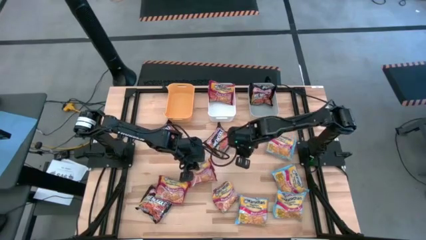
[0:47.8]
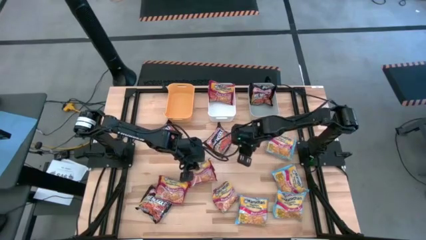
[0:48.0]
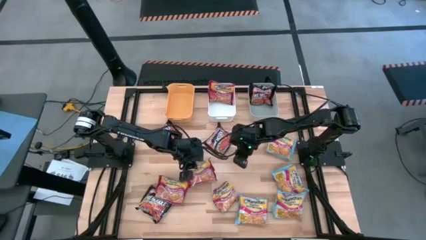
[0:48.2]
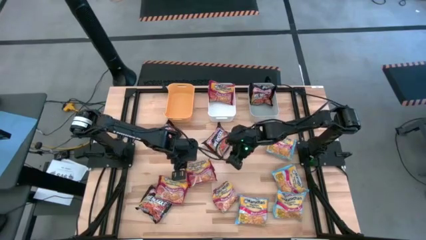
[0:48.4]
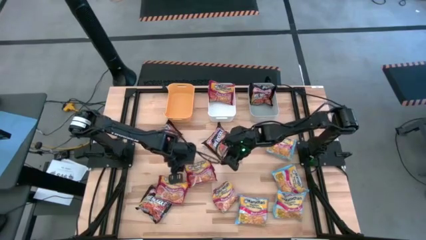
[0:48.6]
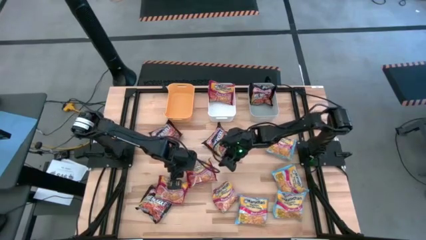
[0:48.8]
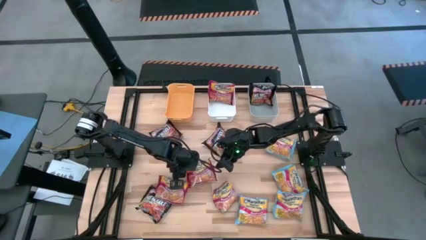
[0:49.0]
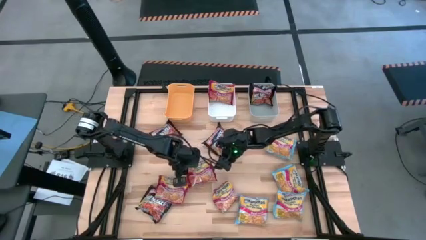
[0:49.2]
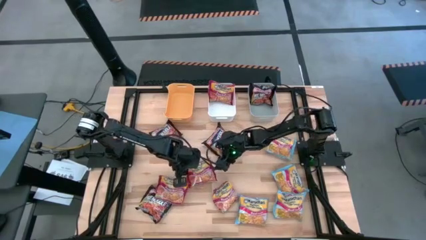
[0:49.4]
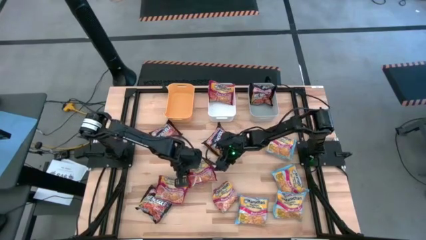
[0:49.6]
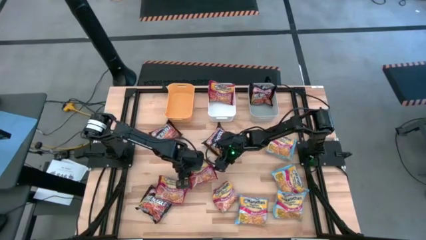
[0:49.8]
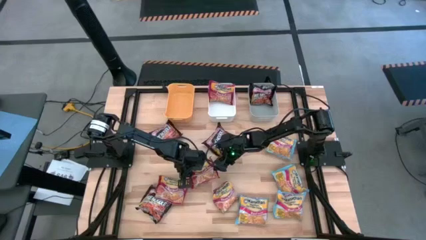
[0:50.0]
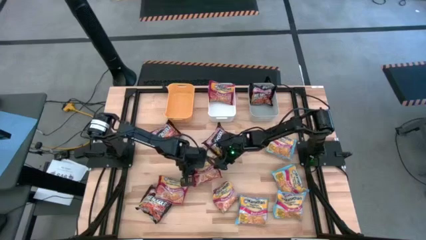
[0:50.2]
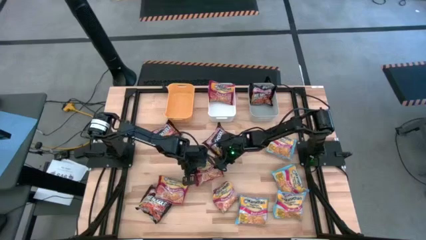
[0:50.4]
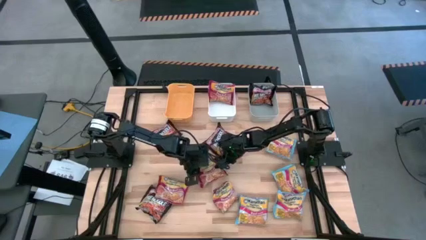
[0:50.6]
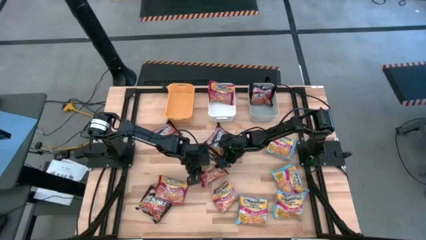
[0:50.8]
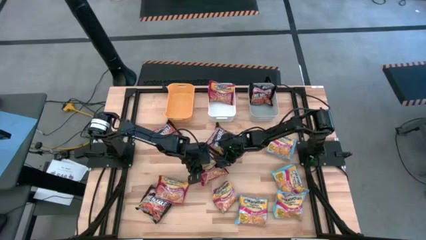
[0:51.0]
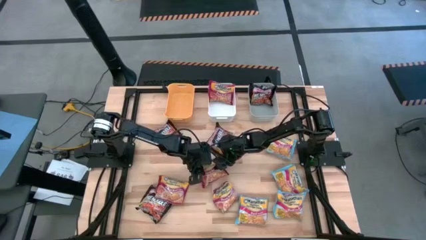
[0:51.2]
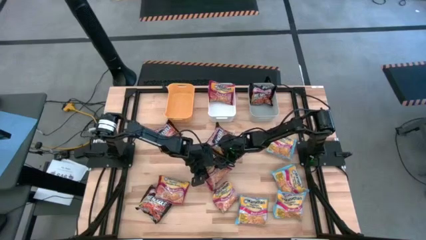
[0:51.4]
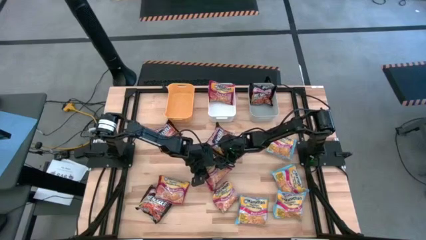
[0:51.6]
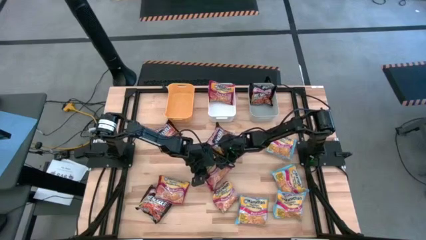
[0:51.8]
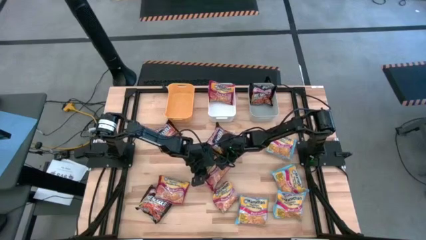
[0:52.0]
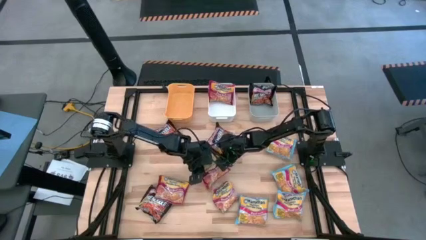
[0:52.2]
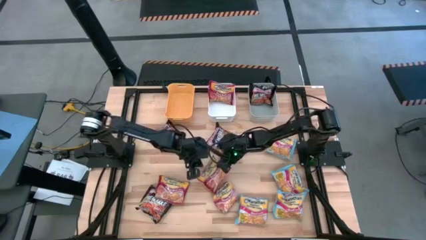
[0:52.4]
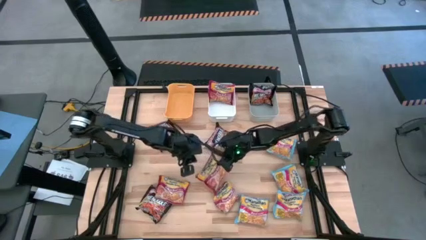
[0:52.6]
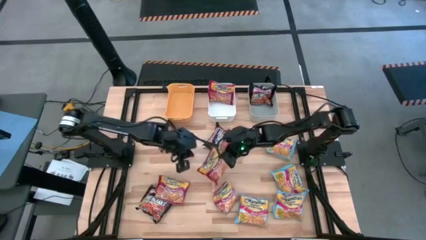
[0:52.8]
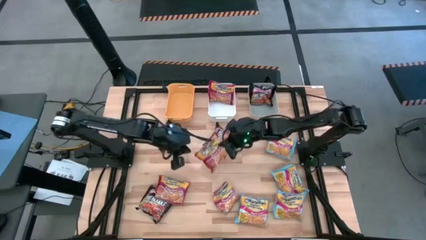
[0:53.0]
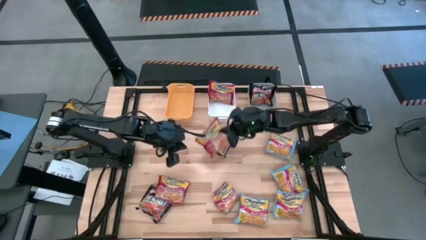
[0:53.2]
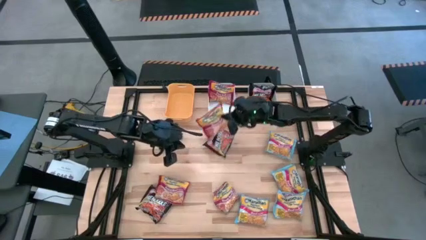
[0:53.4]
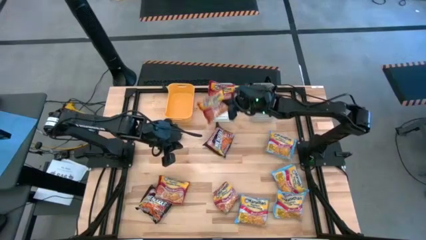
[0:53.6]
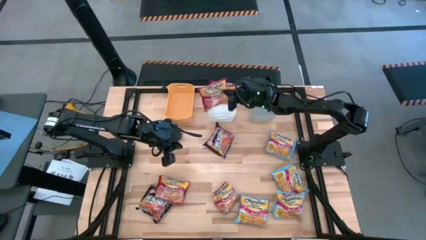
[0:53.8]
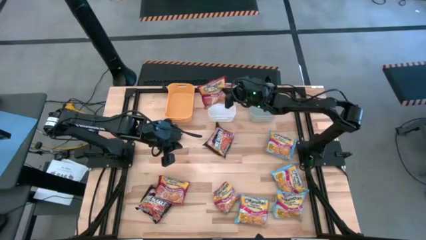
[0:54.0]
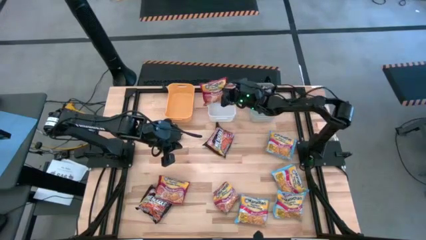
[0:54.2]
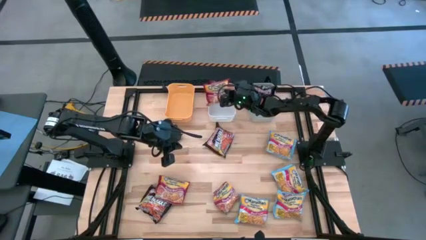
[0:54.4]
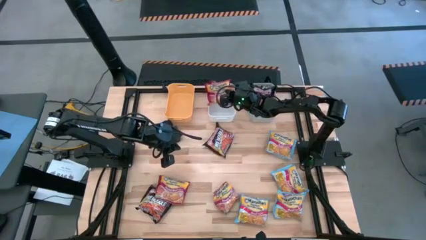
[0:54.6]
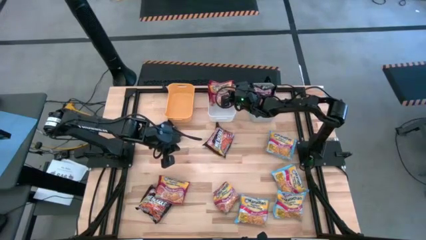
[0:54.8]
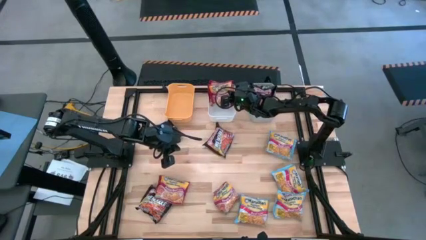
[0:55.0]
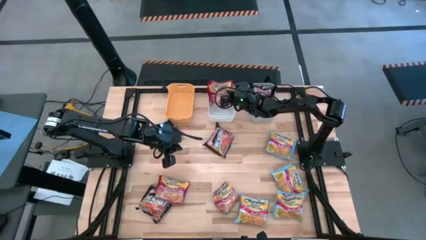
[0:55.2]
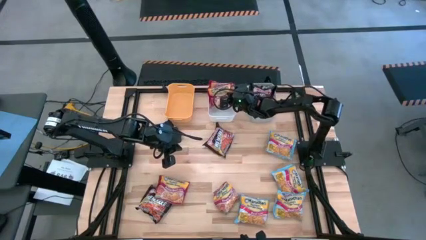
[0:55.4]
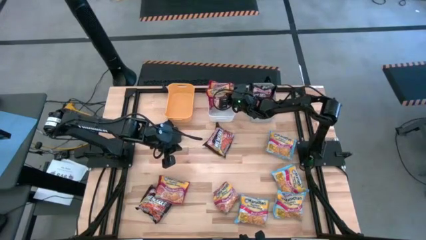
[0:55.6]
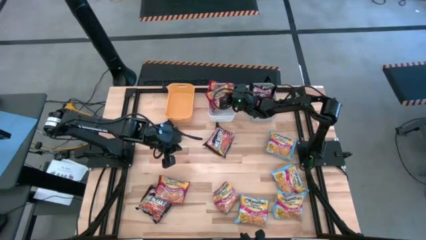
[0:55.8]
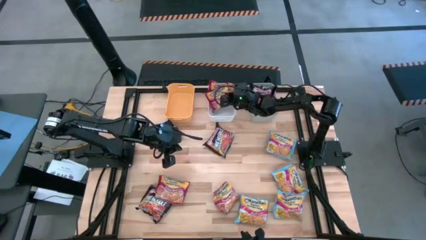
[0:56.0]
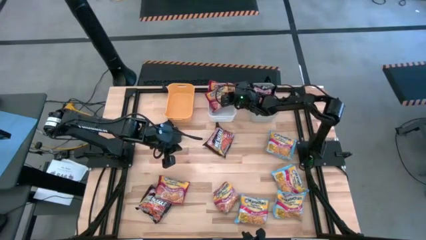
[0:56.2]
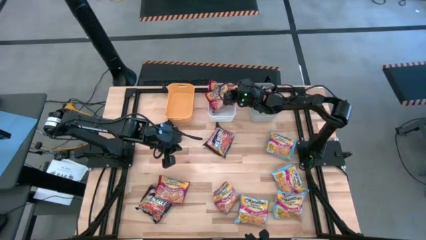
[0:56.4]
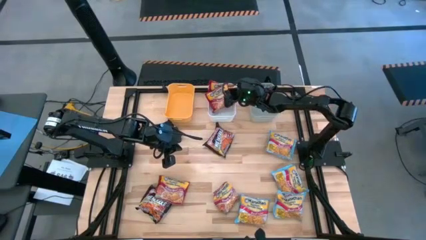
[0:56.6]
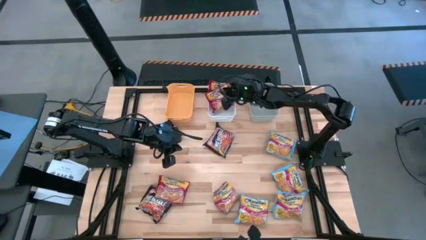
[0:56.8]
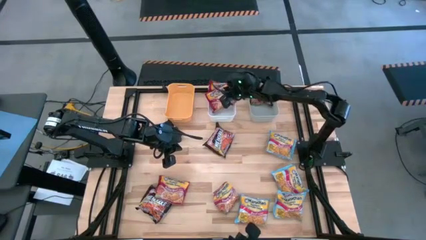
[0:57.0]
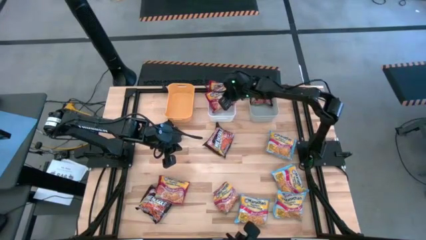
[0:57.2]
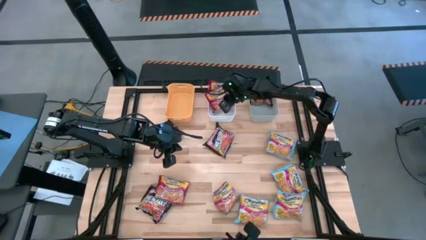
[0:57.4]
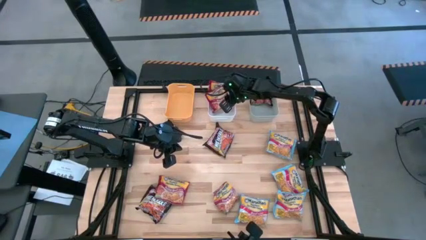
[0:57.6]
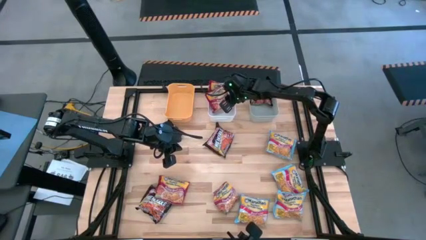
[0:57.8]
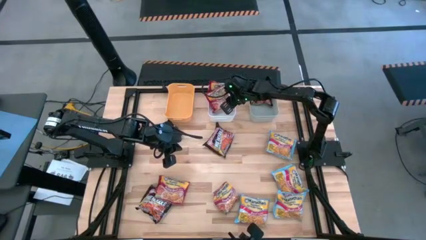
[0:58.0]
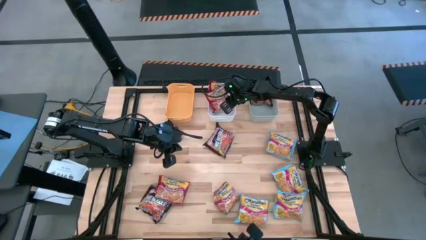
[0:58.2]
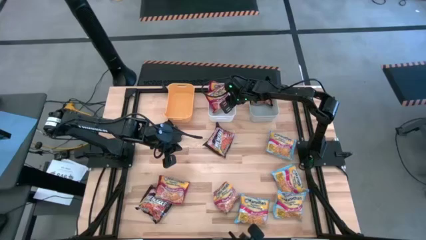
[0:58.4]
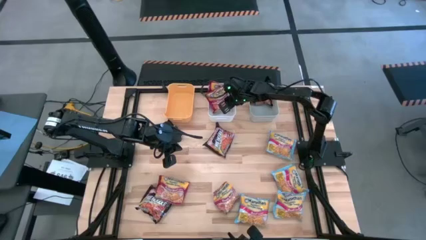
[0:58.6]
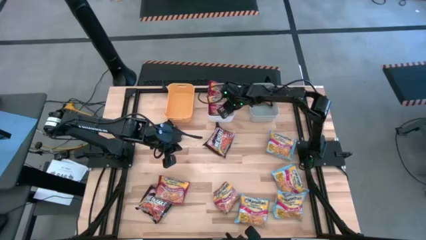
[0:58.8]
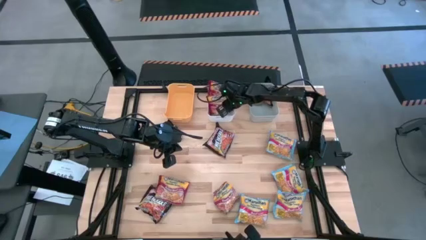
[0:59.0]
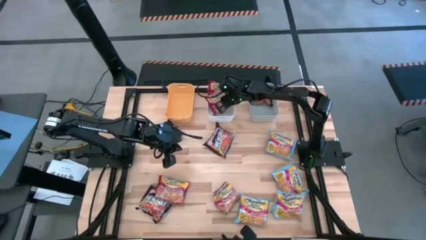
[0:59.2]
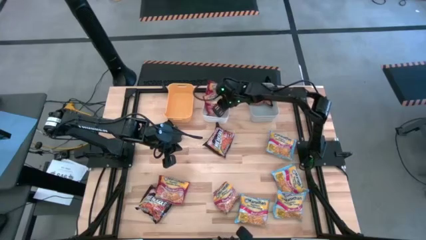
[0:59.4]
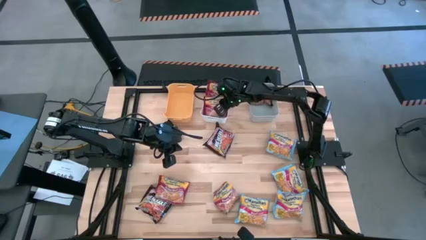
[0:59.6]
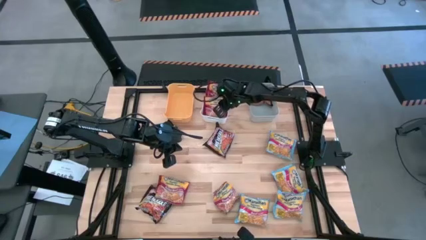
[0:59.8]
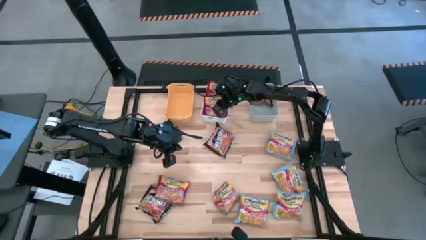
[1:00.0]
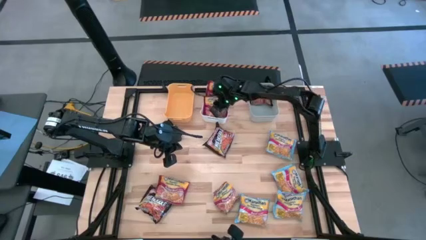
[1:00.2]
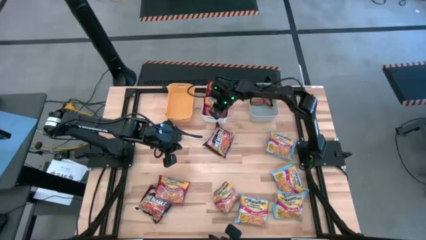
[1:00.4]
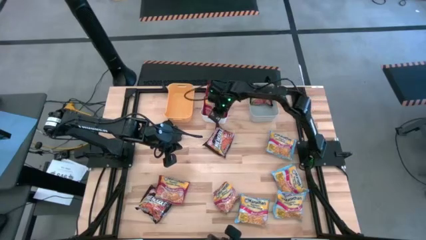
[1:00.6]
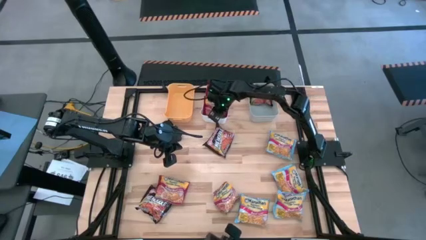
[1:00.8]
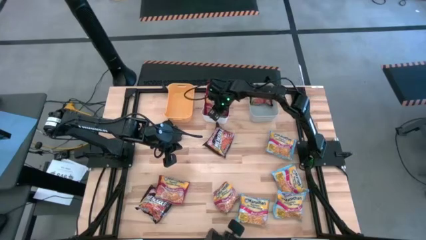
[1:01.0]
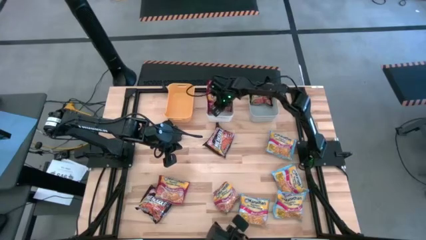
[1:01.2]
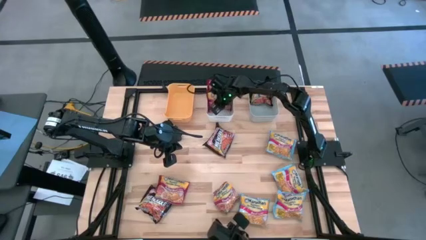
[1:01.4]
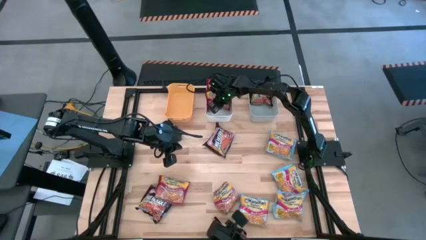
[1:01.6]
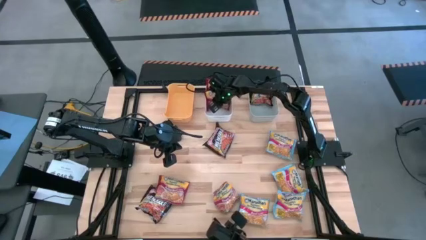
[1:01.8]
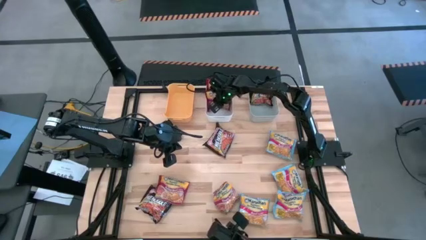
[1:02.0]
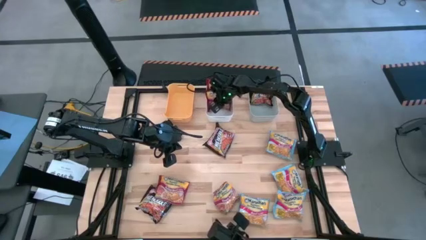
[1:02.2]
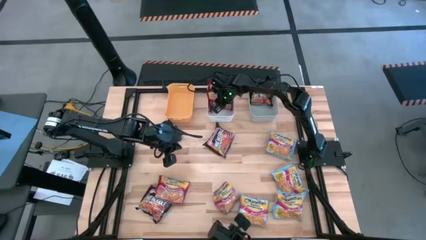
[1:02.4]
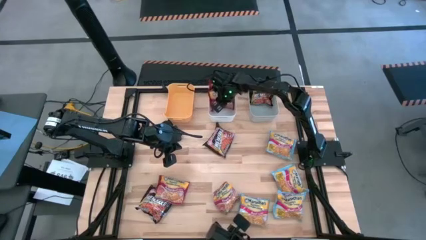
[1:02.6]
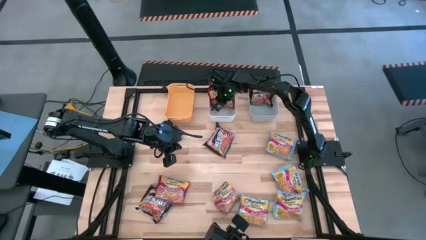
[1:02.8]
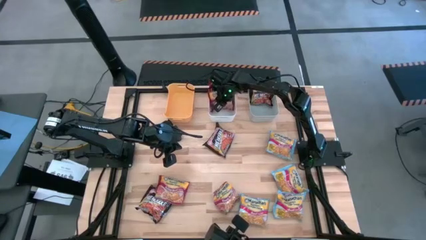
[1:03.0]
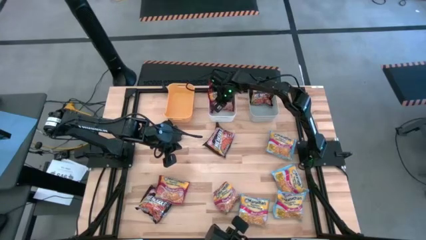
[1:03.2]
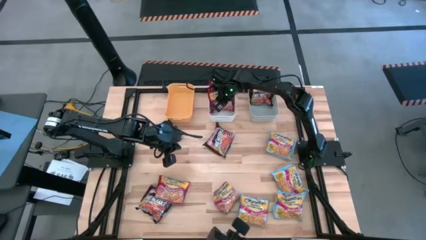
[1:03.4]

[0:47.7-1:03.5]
Task: Sort Maruchan noodles
Put the red noodle pack into the white bin
